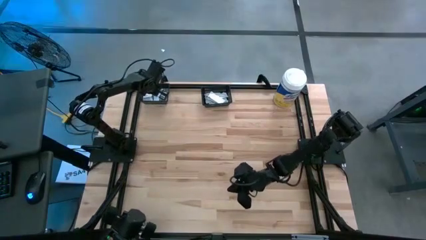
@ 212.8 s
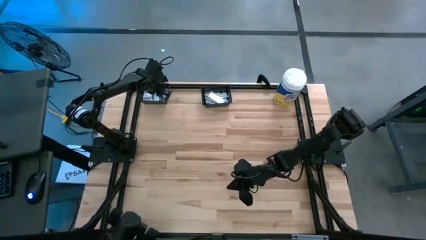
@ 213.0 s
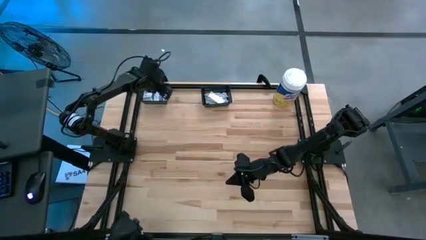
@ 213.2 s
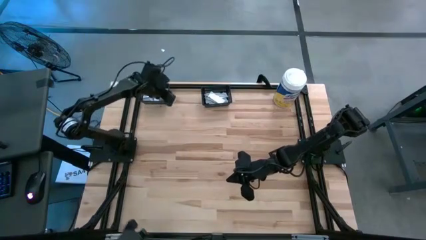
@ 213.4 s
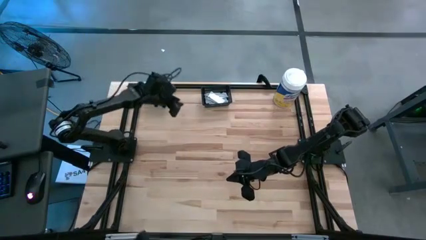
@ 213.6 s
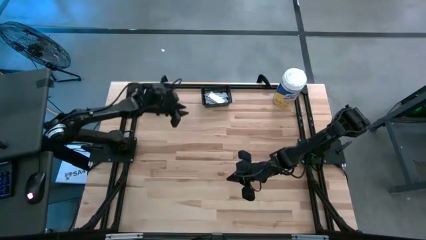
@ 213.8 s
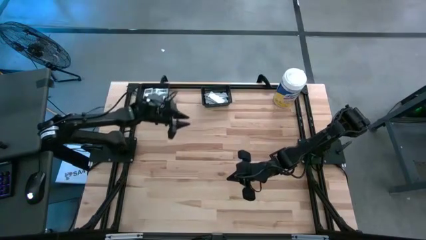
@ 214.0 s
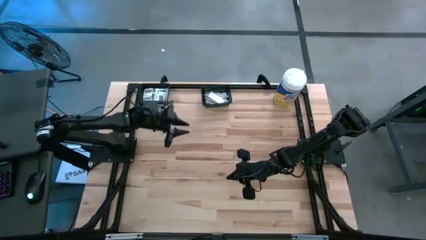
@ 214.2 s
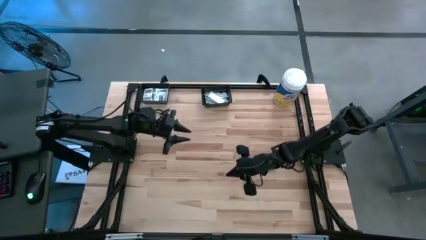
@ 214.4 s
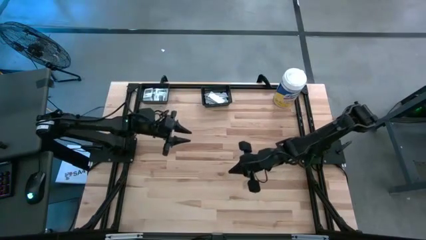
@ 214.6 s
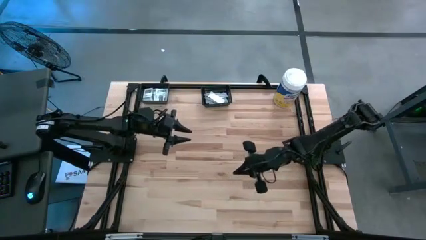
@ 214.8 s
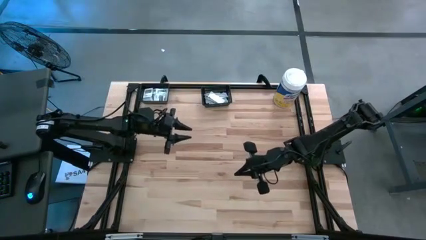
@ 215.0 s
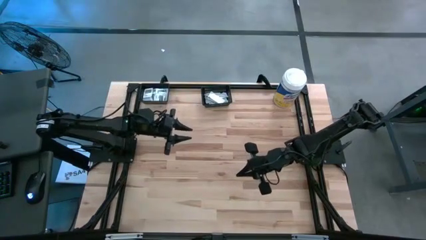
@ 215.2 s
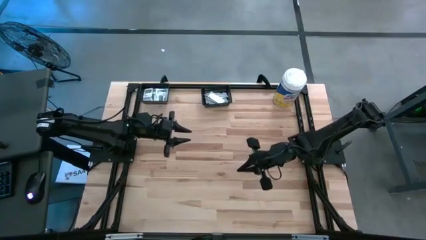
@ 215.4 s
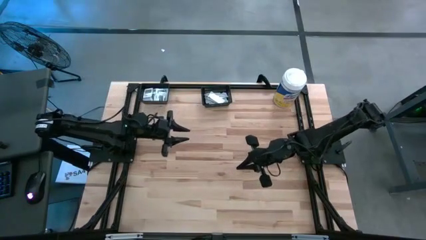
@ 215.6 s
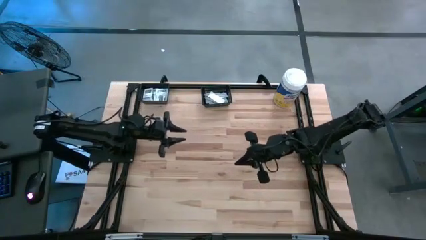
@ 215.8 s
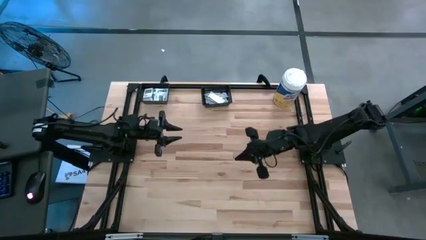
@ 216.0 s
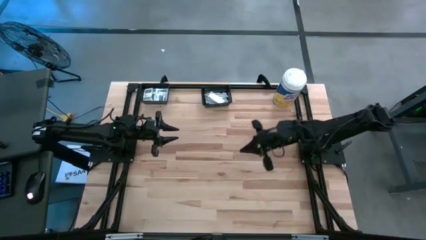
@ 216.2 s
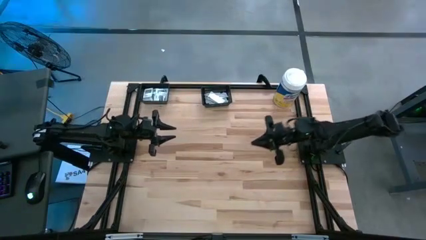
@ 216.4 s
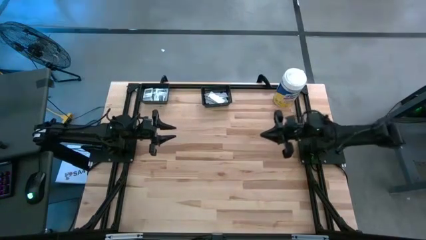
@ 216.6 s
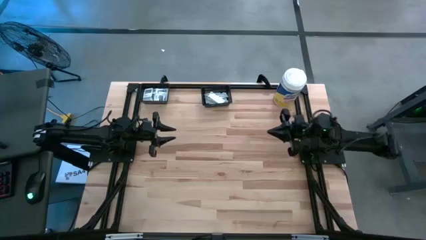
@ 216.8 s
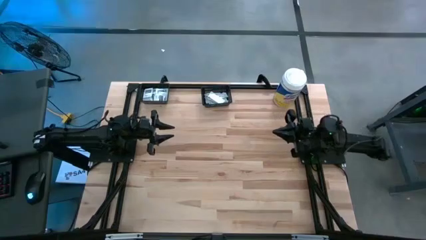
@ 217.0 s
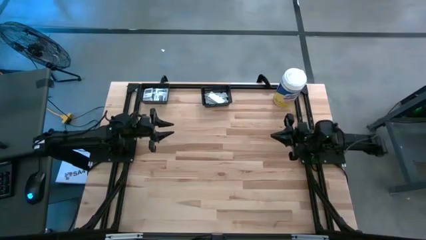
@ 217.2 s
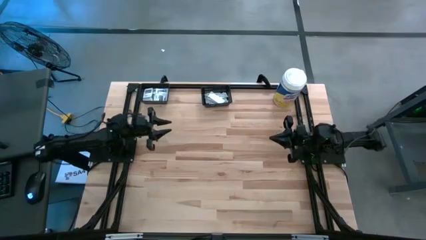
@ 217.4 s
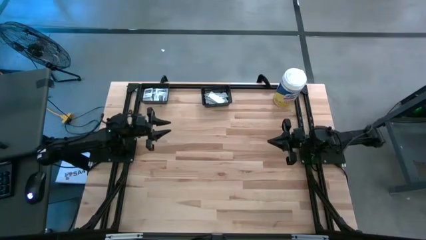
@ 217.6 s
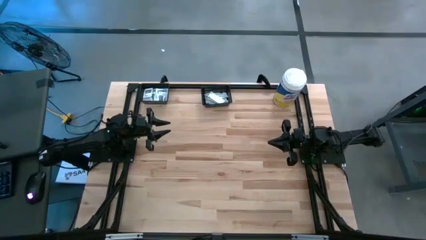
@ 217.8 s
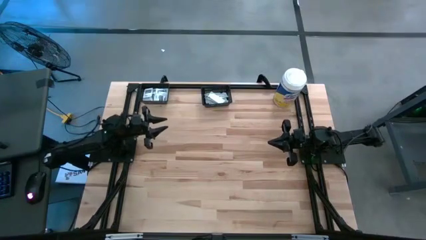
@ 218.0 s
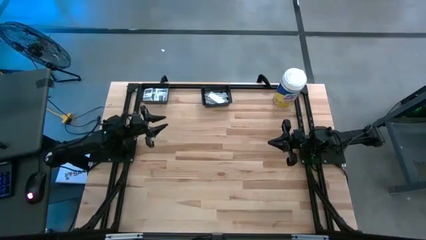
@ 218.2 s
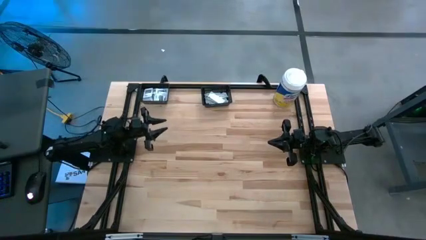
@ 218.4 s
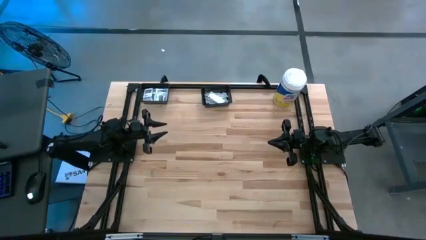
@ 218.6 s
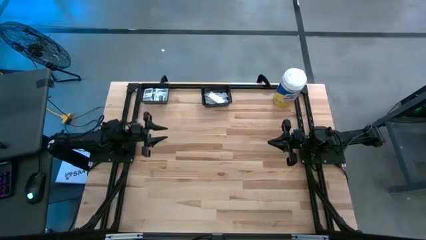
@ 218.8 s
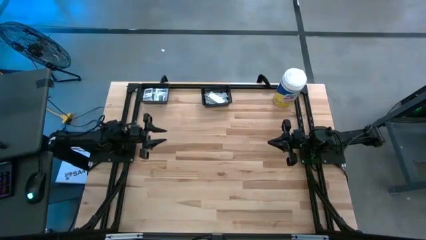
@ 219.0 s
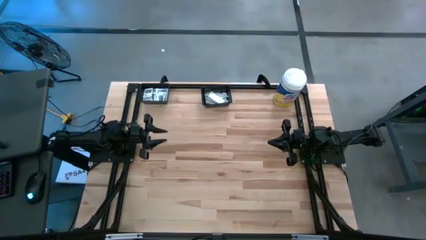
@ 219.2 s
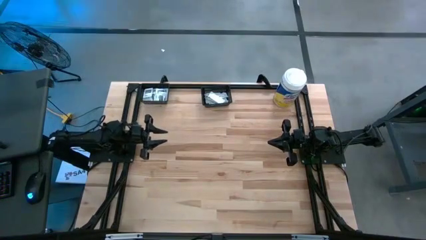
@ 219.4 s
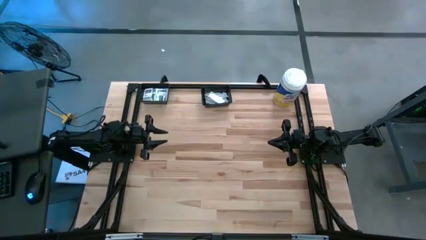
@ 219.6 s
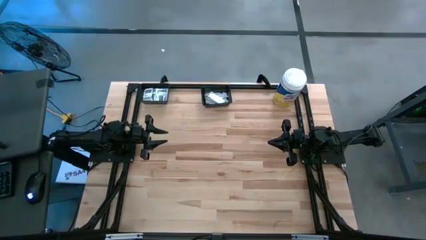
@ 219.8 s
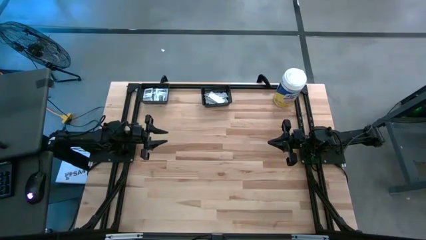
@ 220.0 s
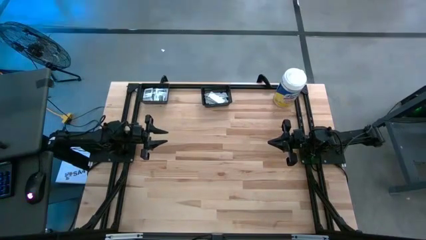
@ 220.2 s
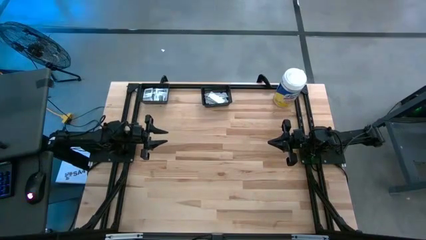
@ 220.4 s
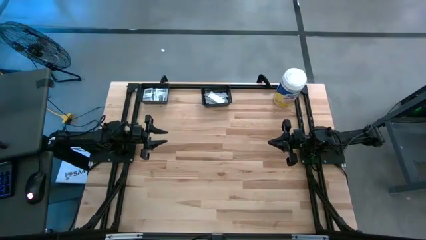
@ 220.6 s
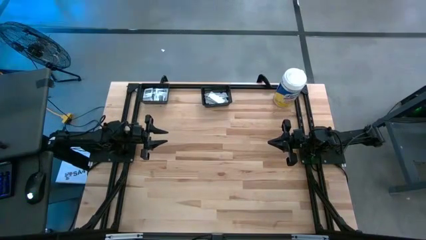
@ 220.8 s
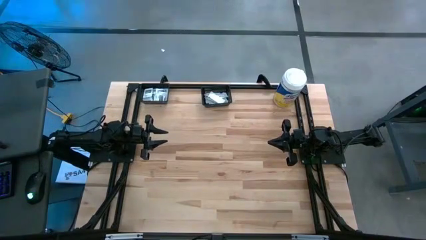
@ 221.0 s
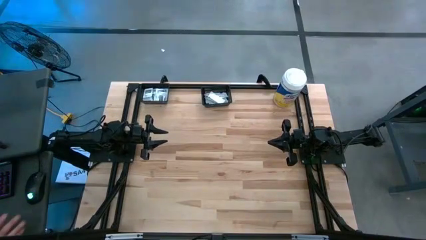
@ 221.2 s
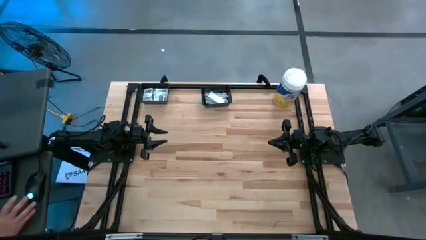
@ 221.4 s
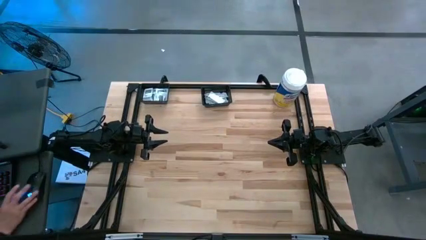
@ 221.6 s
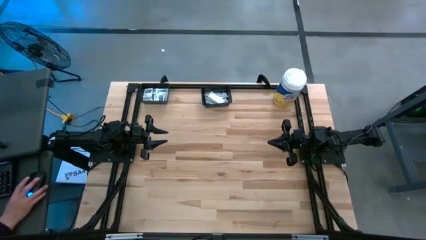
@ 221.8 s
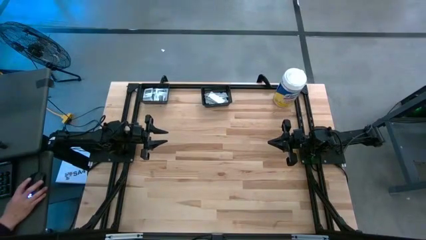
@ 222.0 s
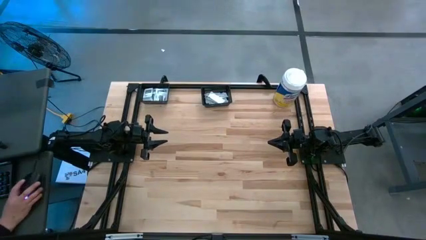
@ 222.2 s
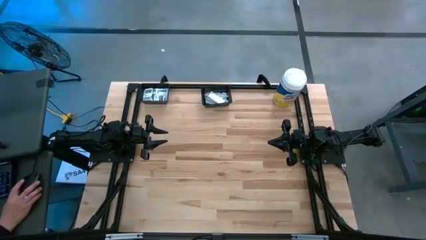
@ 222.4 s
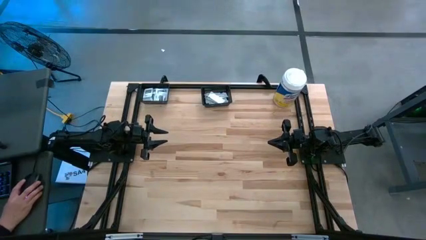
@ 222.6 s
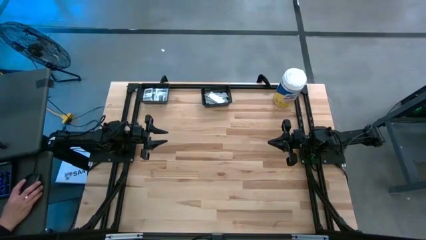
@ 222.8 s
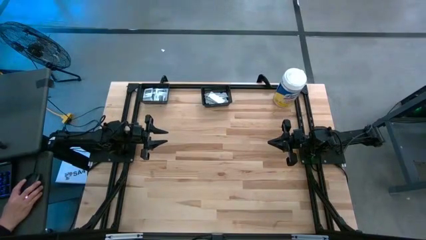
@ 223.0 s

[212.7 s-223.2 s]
Task: Pick & Place First Aid Supplies
Return to Home Position

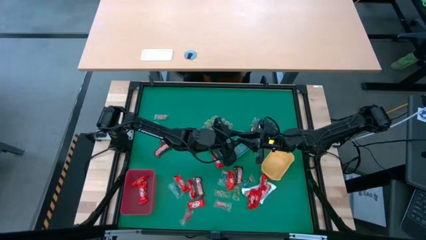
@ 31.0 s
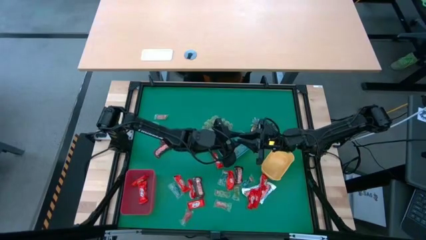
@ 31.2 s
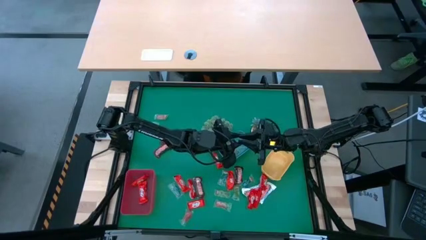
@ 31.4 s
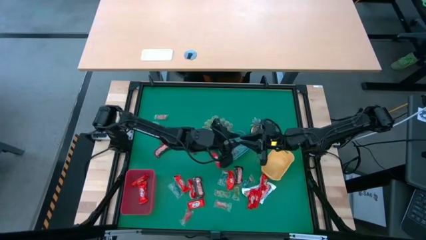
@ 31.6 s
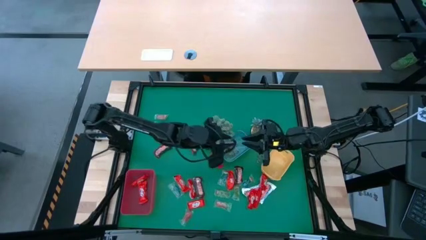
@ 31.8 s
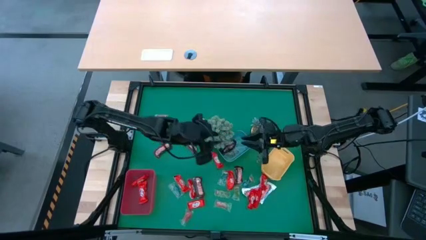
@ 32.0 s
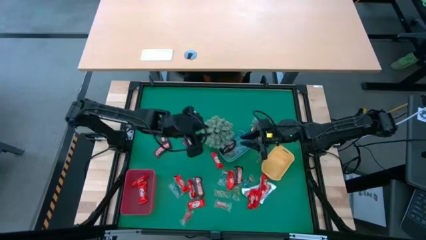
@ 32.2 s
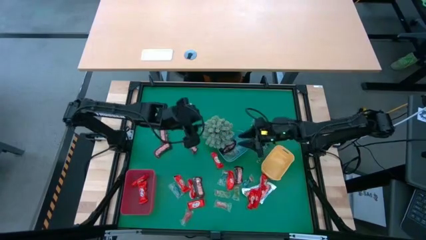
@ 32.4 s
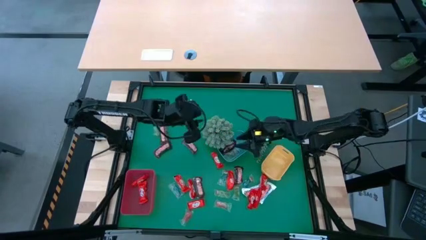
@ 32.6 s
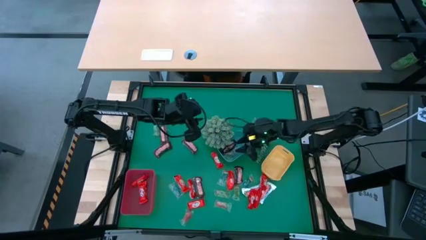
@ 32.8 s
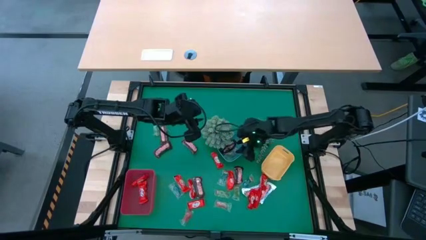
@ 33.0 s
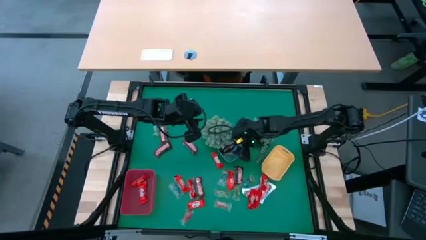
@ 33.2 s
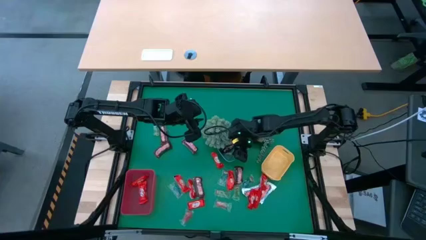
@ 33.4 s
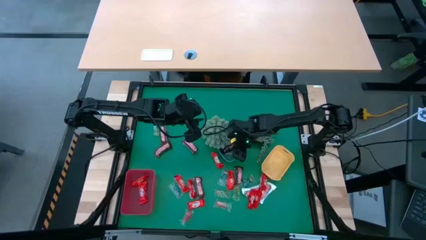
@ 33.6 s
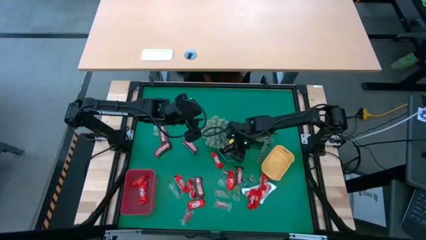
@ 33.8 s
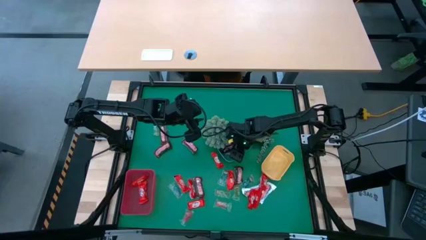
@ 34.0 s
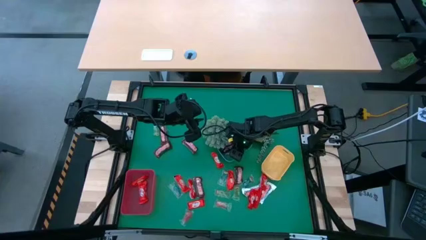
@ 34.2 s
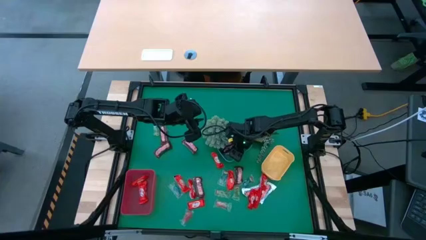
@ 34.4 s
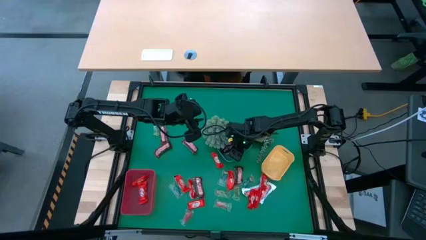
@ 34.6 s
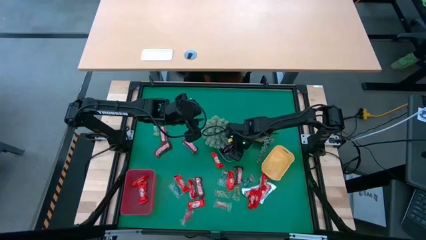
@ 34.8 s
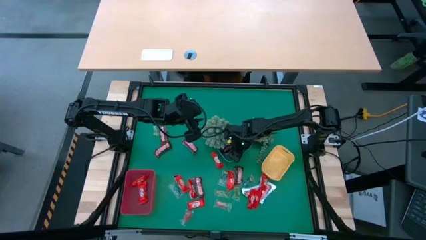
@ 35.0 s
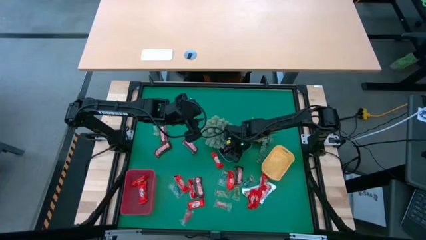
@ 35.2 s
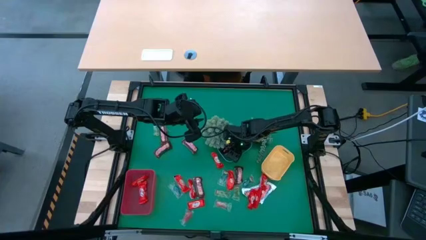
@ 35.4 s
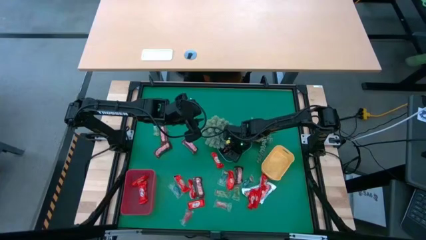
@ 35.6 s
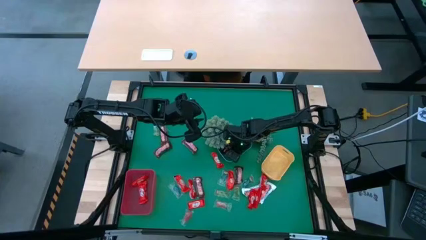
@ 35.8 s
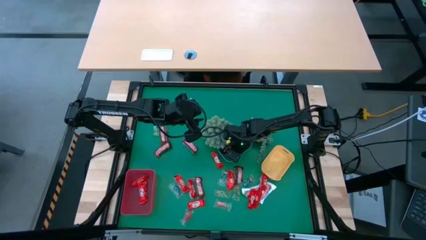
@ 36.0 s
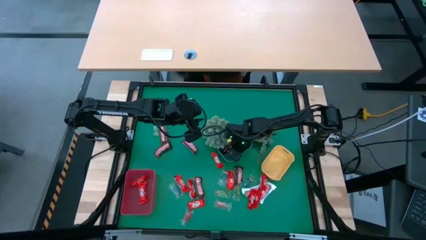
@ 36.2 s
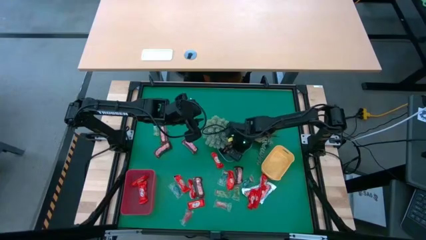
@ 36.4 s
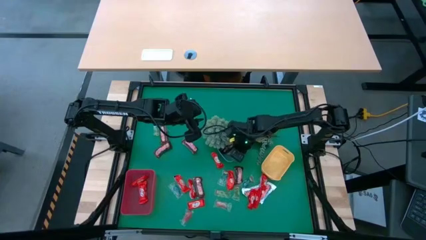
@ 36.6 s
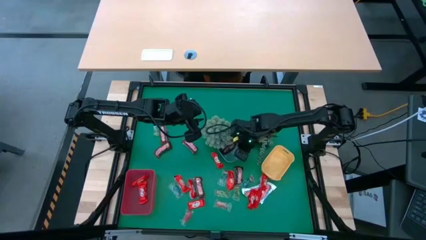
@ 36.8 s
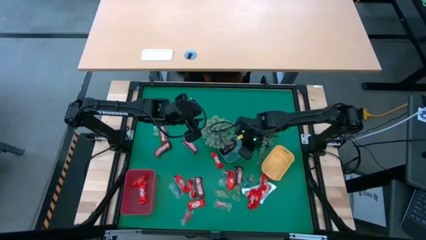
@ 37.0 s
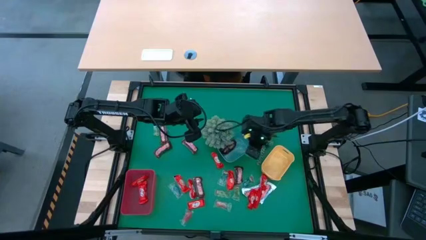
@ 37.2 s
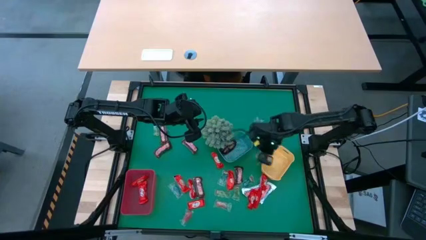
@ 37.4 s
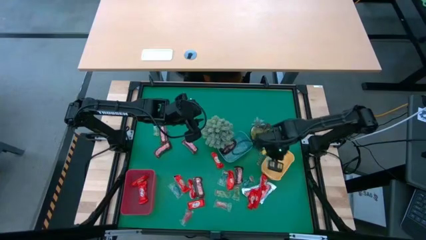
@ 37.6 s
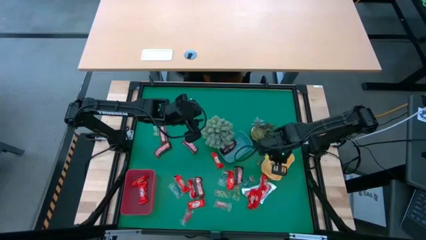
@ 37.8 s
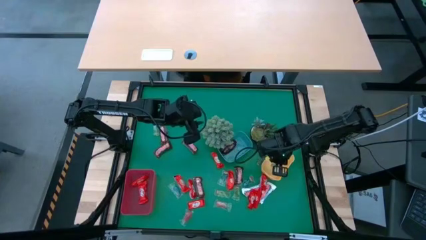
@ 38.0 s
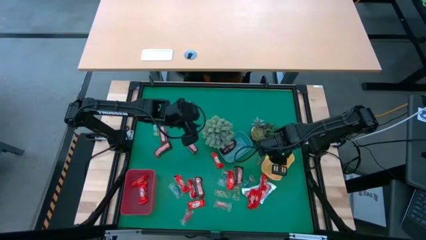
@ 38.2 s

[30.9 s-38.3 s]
Task: Organize candy in baskets
Put the green gummy into the yellow bin
